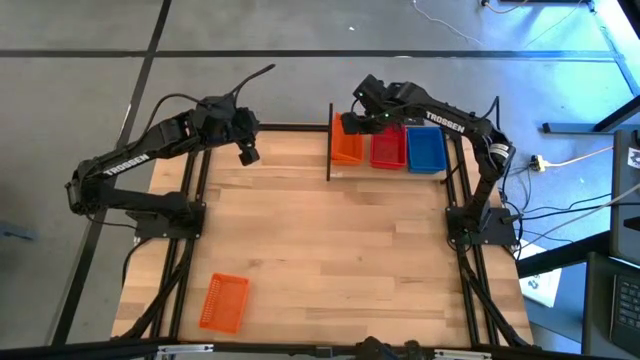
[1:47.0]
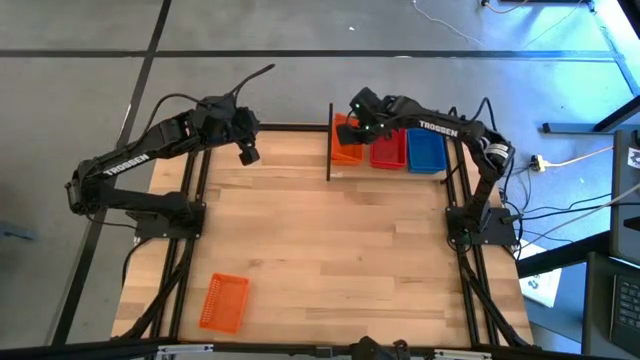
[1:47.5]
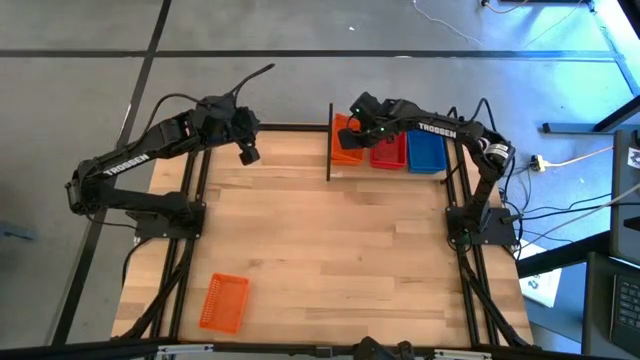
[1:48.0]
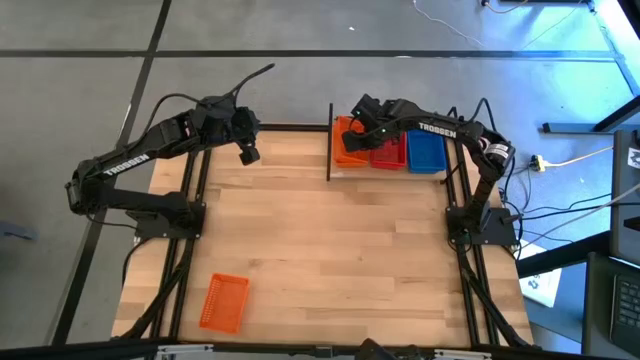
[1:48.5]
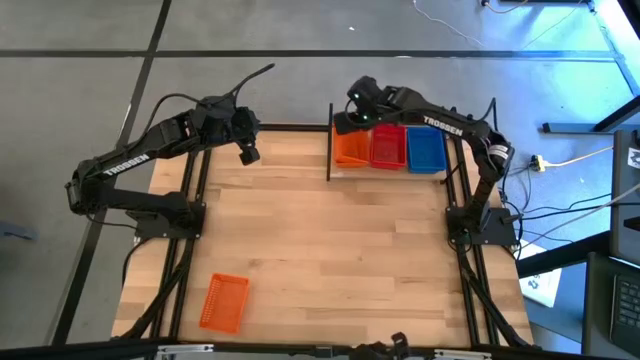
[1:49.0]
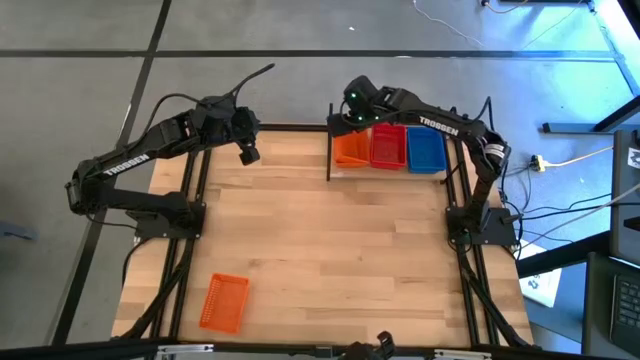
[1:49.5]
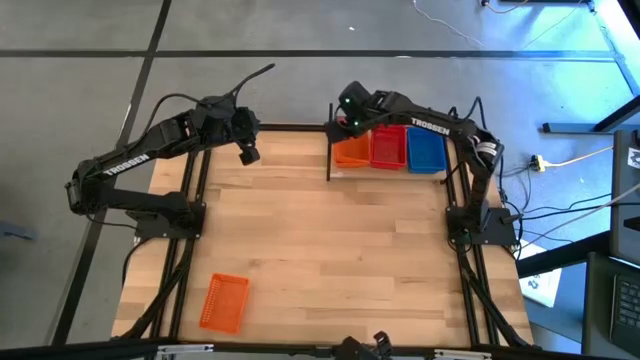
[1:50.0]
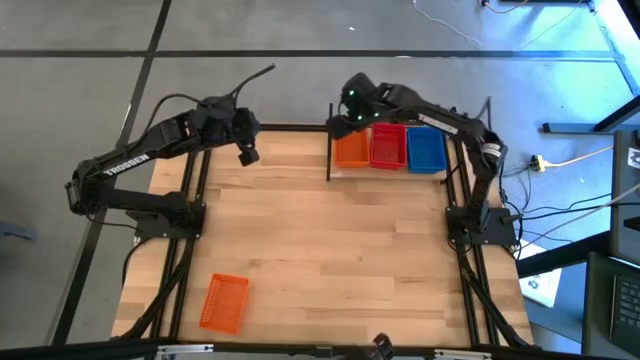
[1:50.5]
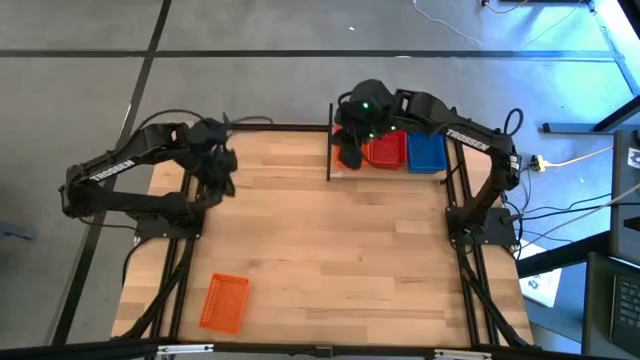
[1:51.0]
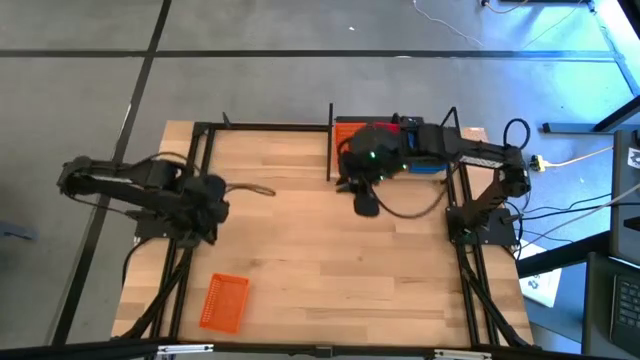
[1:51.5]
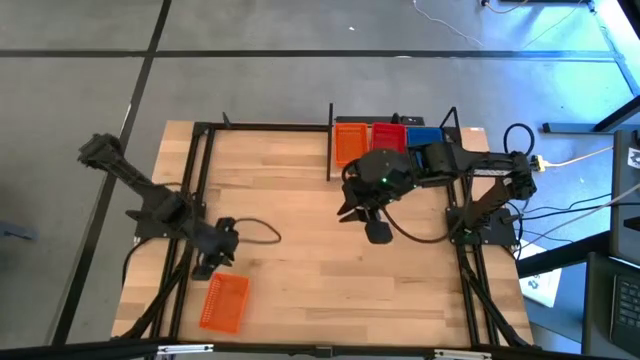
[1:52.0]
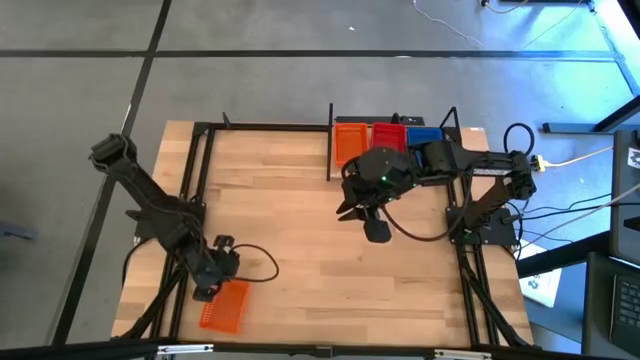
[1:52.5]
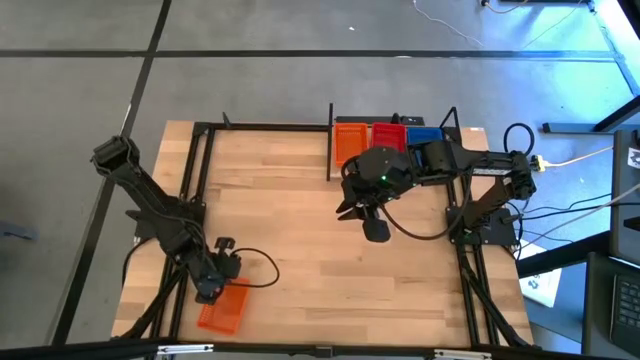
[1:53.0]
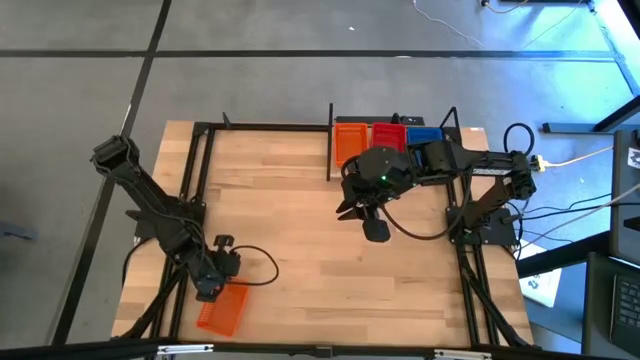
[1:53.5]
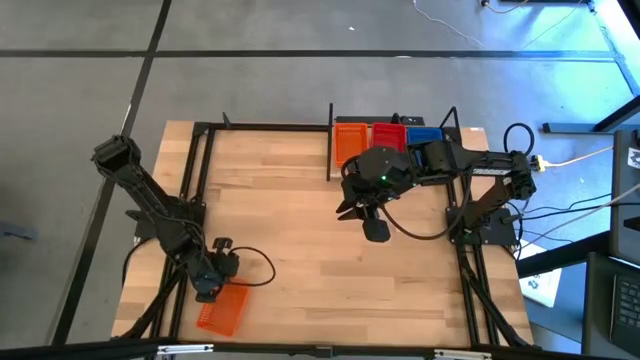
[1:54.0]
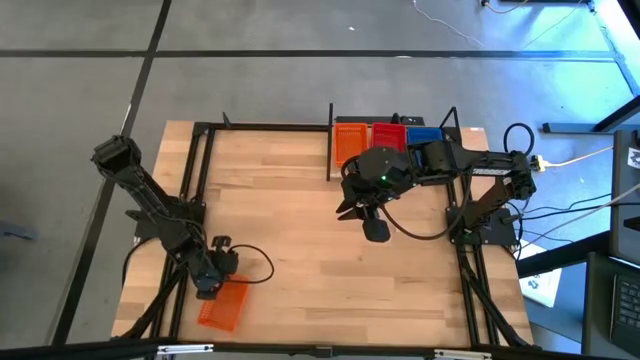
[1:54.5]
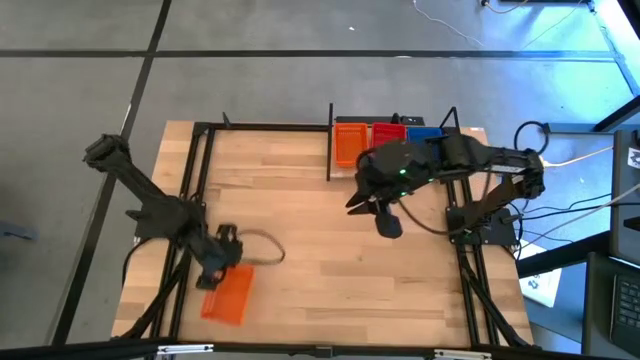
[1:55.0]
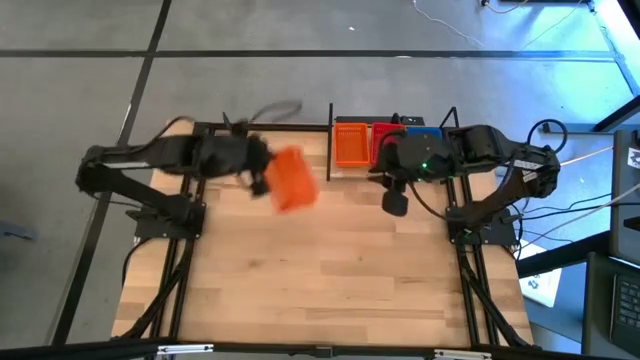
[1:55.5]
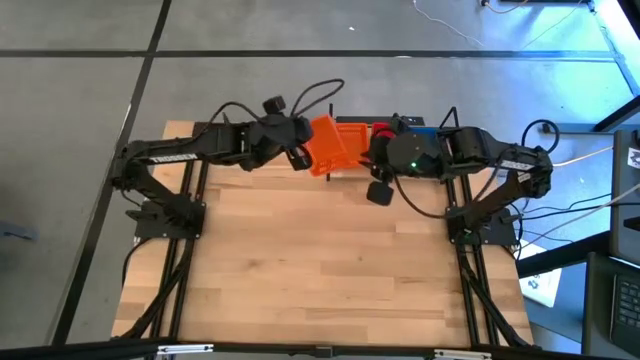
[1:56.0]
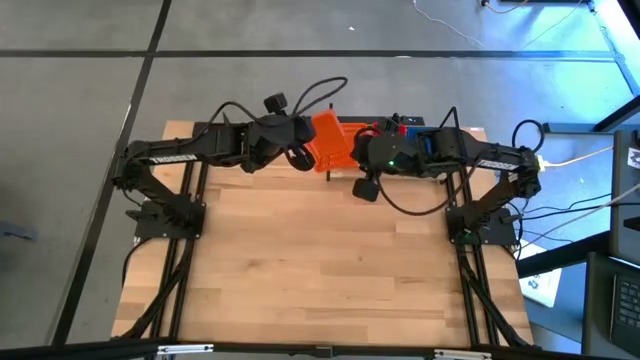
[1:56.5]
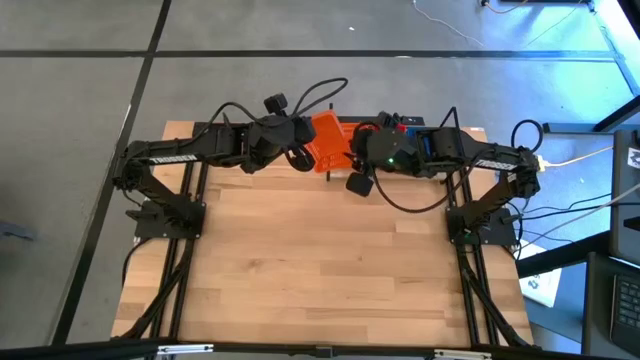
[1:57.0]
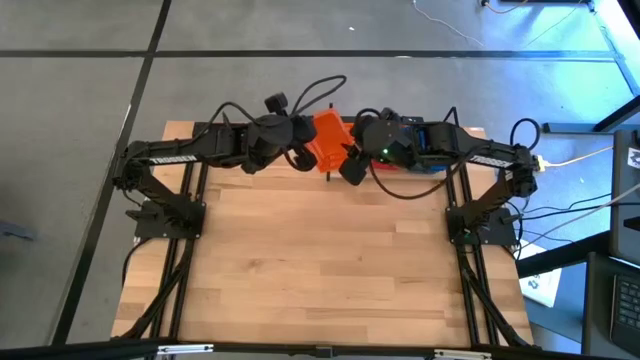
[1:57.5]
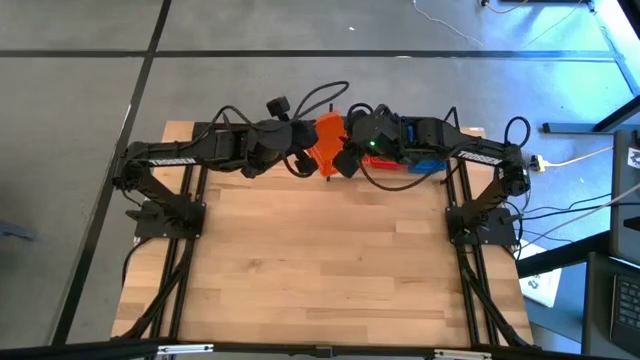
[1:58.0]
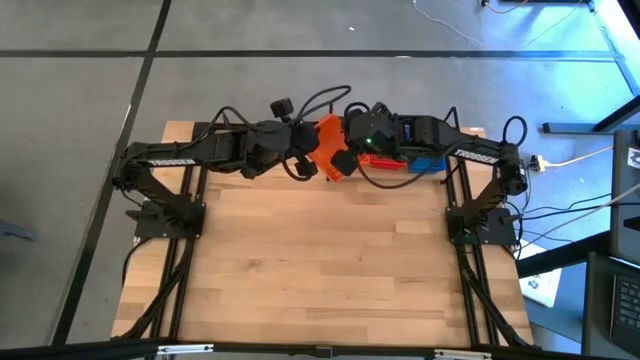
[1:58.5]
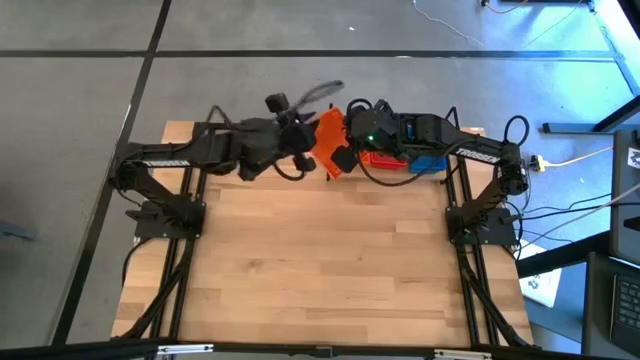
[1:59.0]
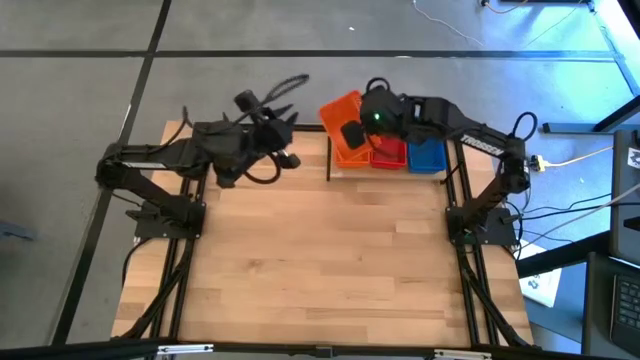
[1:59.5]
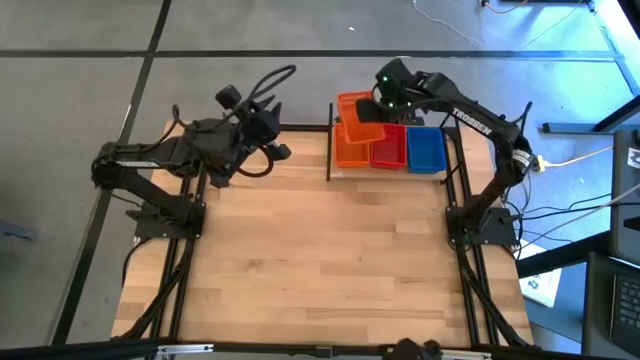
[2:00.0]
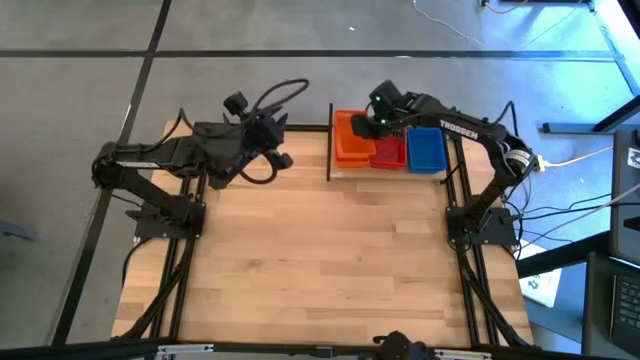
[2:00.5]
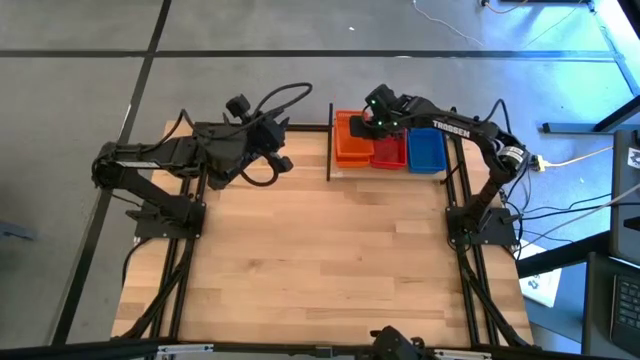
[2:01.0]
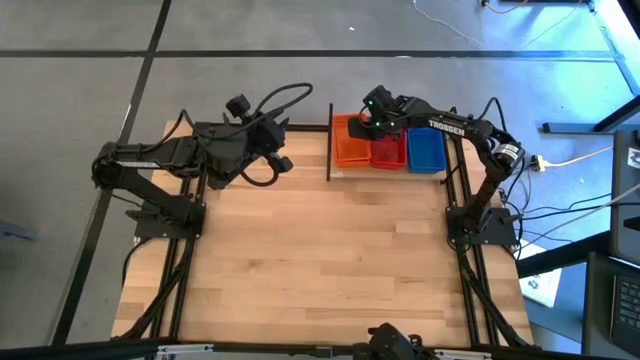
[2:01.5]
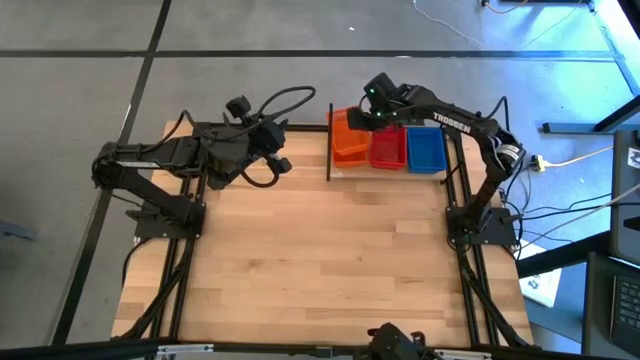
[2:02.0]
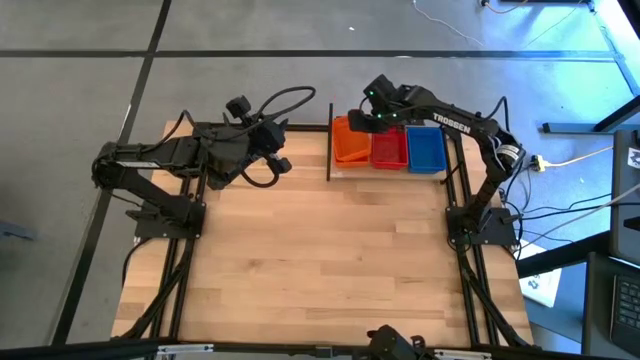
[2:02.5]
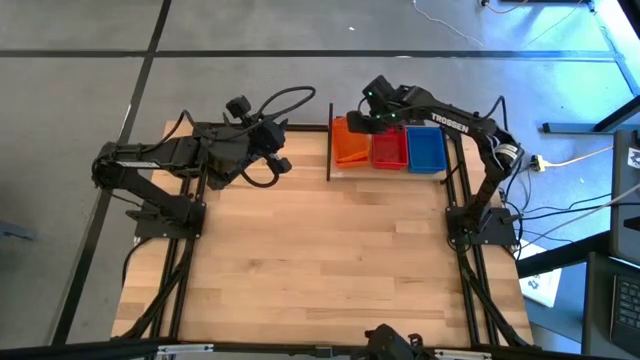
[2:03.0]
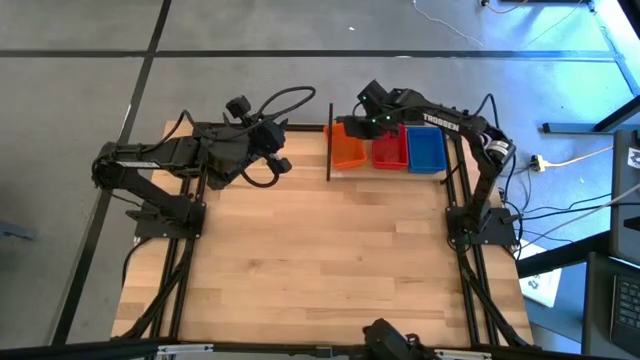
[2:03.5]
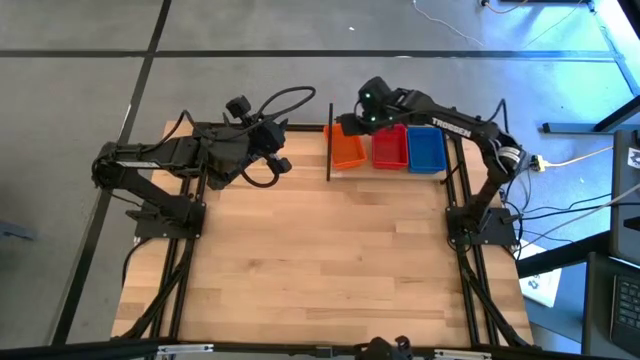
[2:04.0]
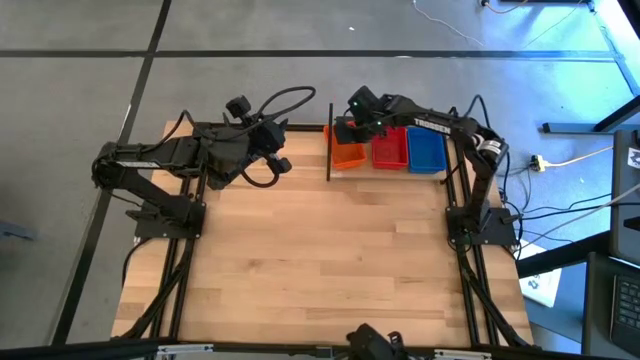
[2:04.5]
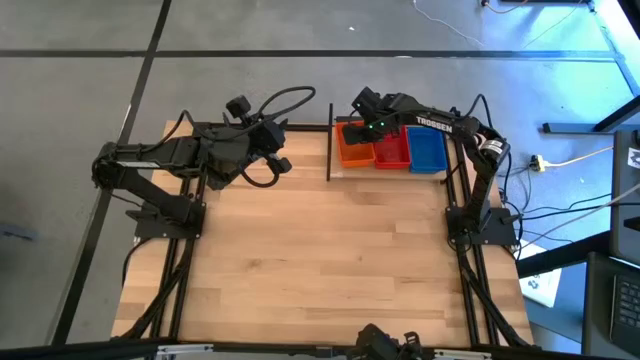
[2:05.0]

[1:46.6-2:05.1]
Task: Stack baskets on shelf by color
Stack the right orange basket on top of the stacked orange baskets on the shelf

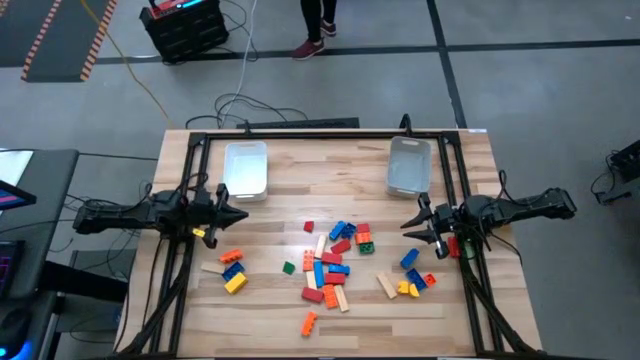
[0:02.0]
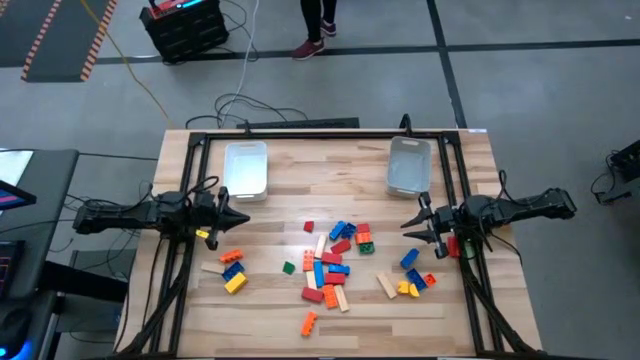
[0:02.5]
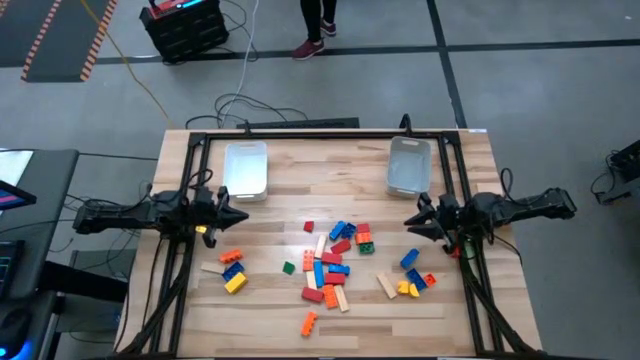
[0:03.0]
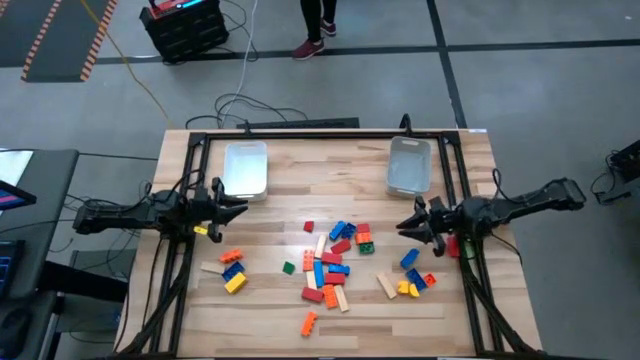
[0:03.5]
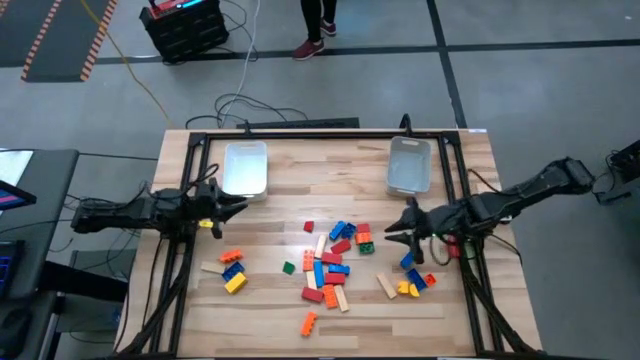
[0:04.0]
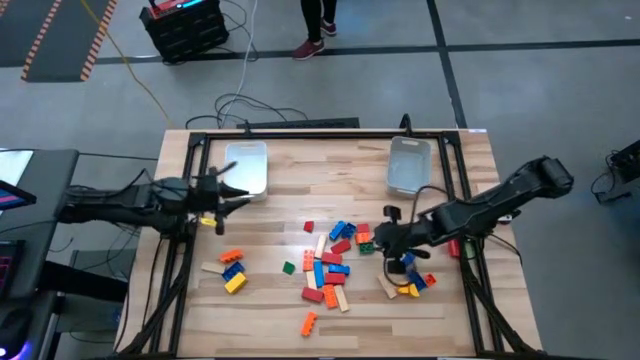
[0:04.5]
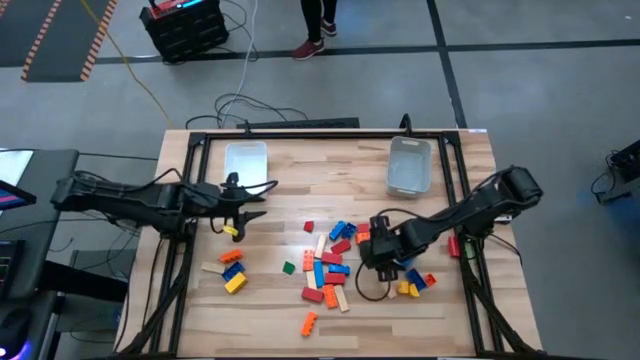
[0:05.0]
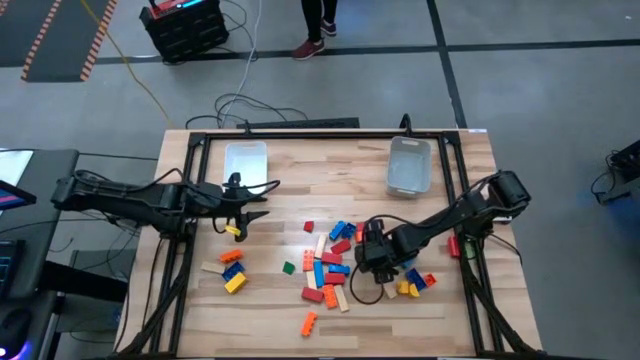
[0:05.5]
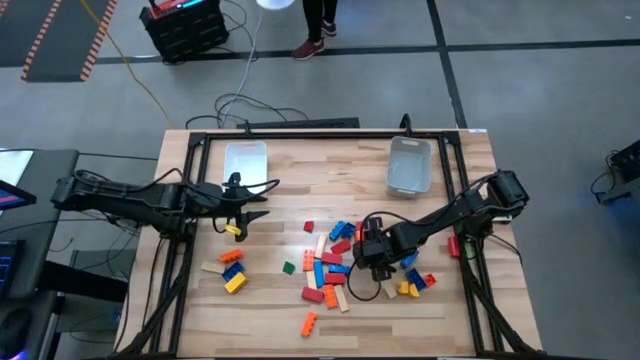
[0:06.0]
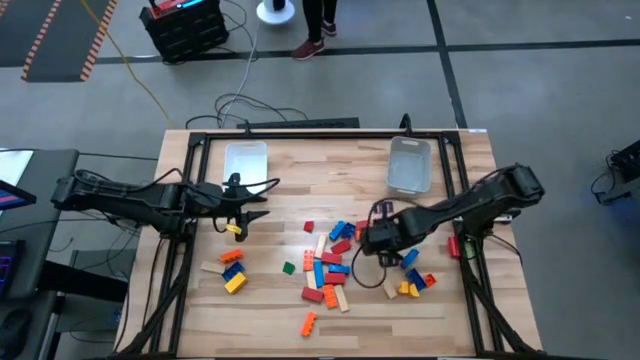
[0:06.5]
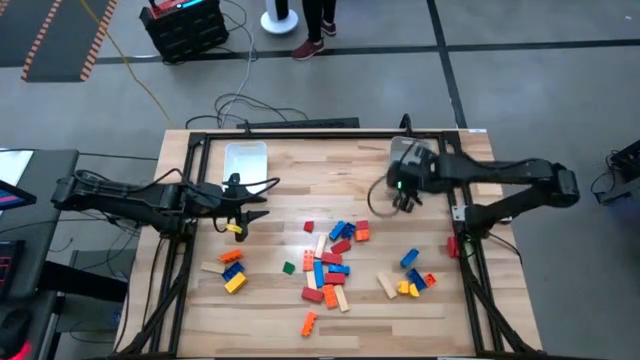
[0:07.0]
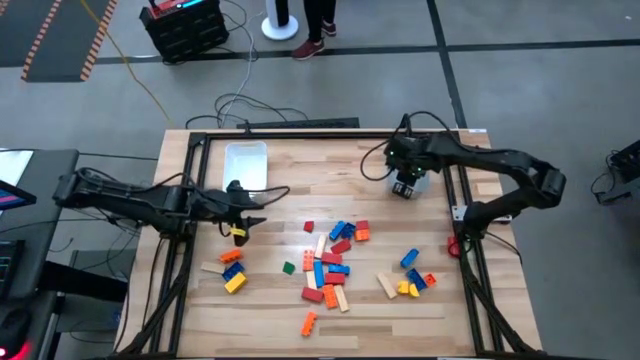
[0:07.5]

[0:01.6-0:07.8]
Task: Sort blocks by size
Put the small green game piece into the gray bin
